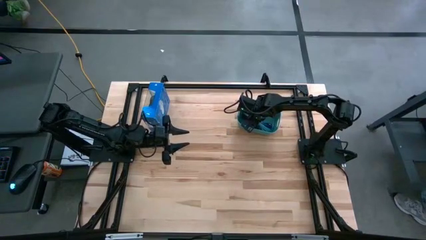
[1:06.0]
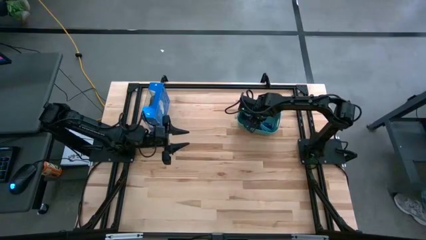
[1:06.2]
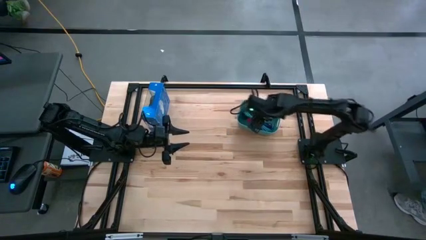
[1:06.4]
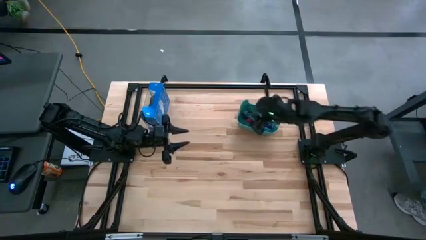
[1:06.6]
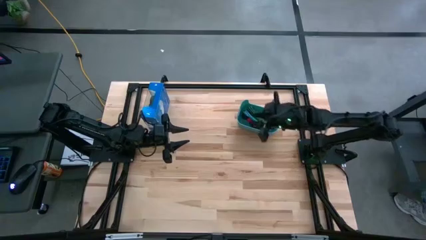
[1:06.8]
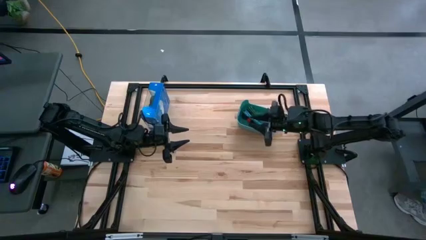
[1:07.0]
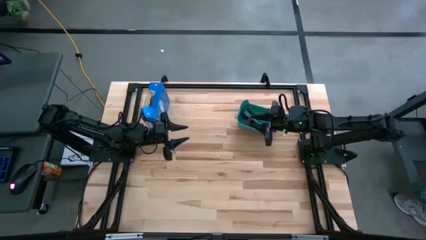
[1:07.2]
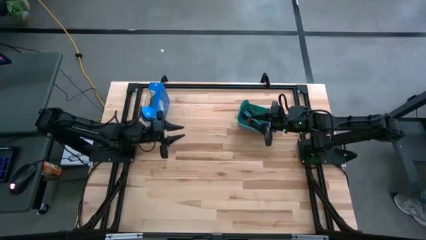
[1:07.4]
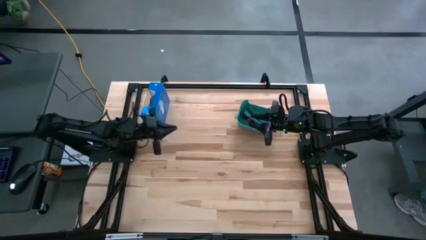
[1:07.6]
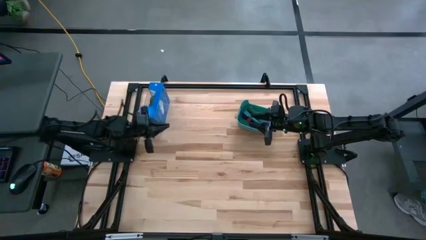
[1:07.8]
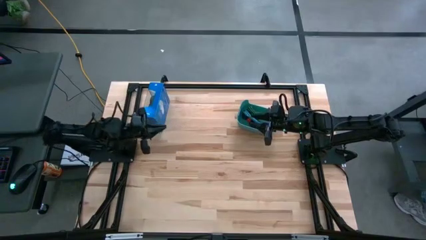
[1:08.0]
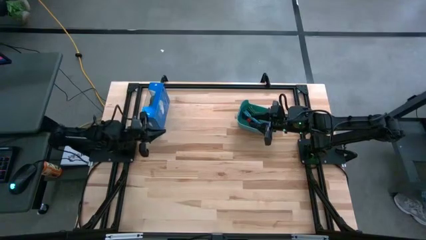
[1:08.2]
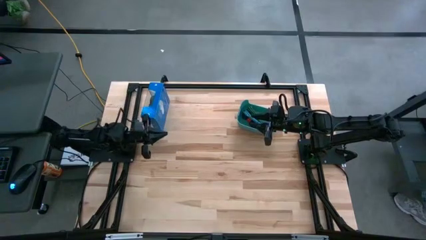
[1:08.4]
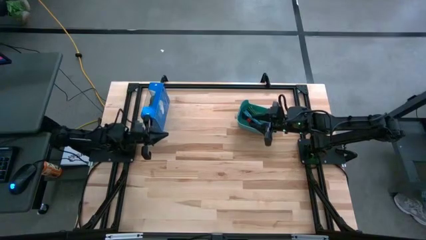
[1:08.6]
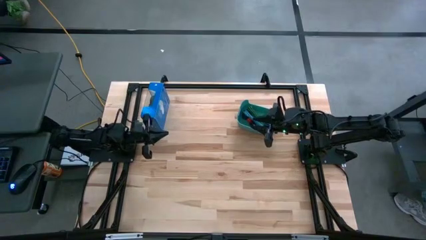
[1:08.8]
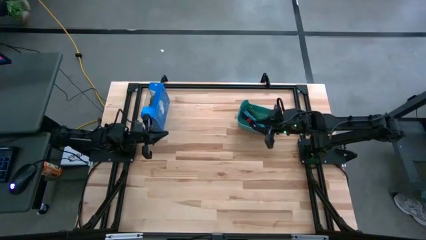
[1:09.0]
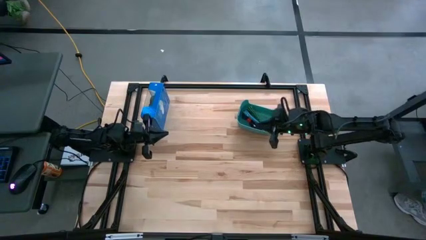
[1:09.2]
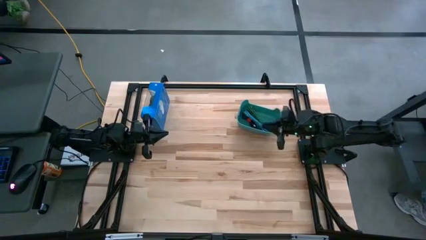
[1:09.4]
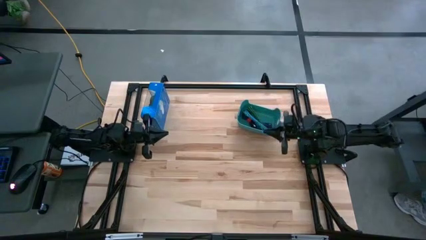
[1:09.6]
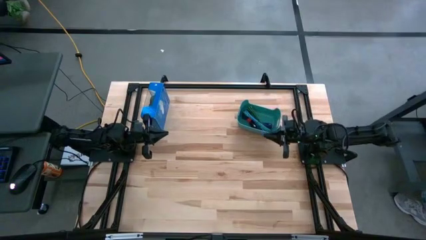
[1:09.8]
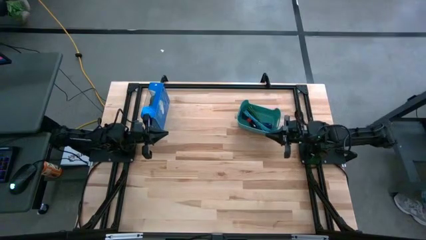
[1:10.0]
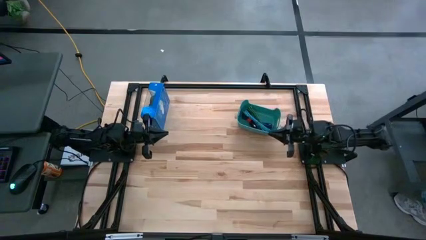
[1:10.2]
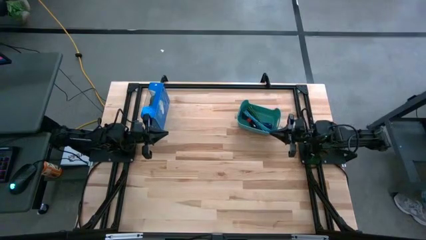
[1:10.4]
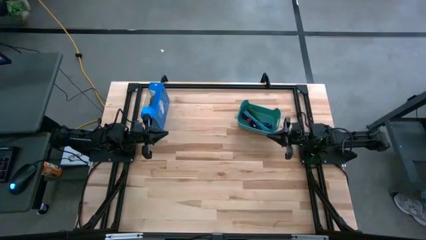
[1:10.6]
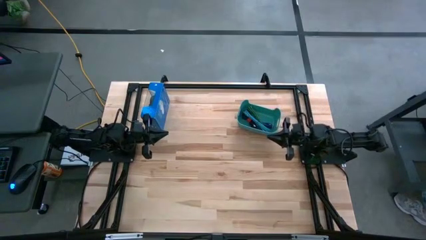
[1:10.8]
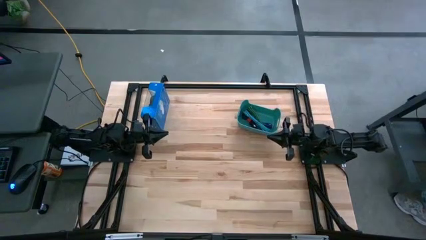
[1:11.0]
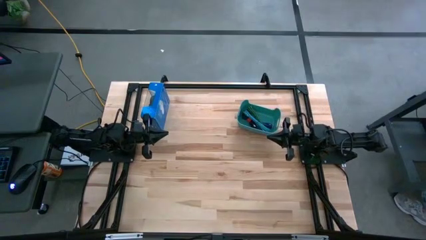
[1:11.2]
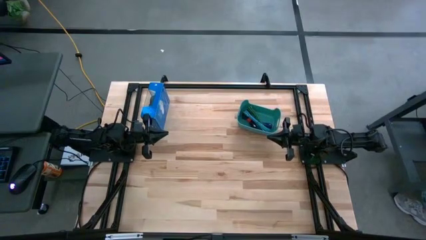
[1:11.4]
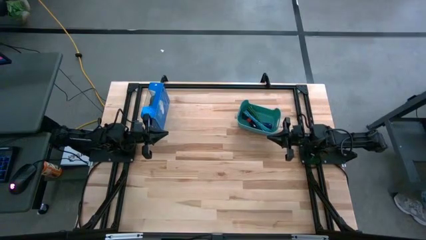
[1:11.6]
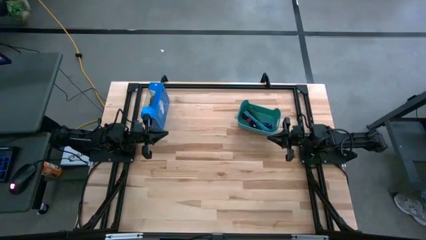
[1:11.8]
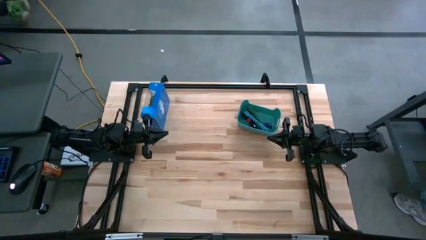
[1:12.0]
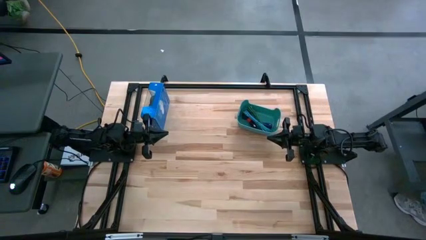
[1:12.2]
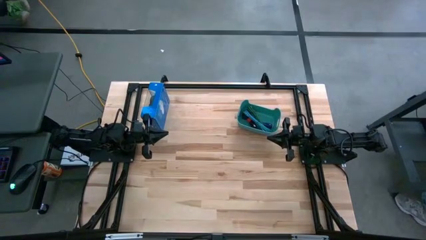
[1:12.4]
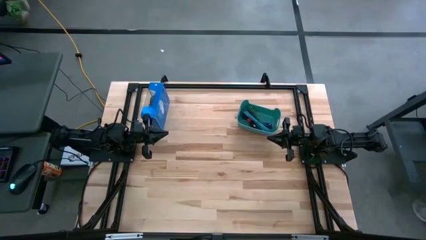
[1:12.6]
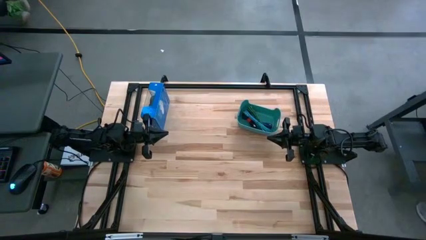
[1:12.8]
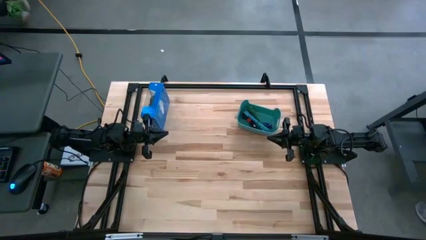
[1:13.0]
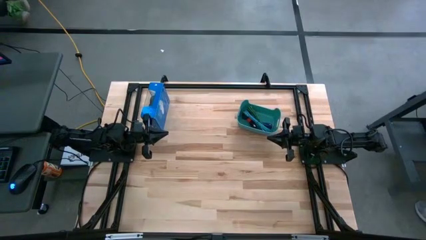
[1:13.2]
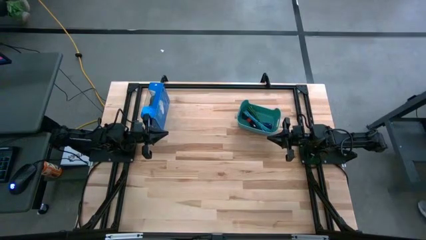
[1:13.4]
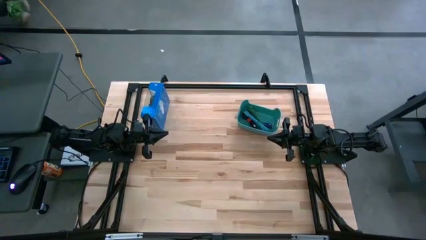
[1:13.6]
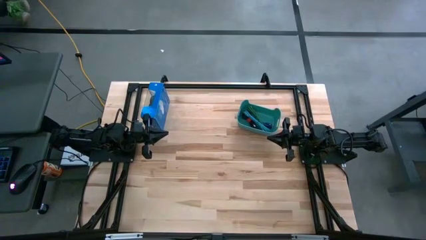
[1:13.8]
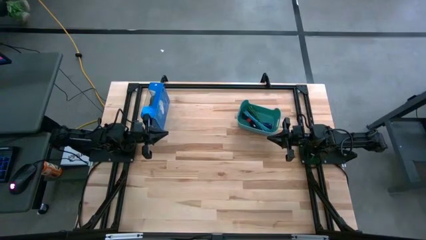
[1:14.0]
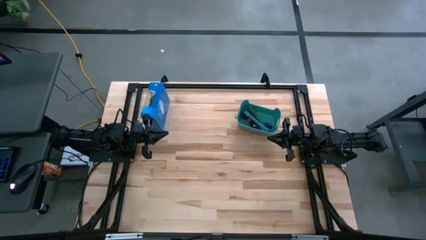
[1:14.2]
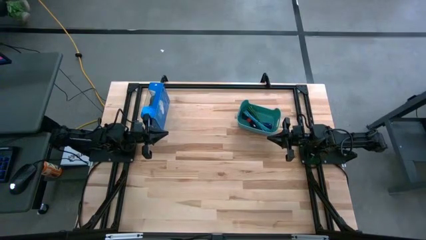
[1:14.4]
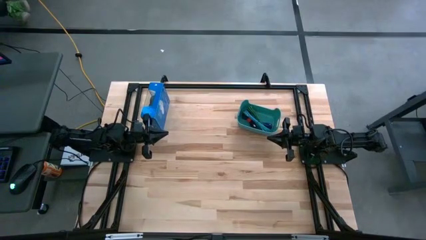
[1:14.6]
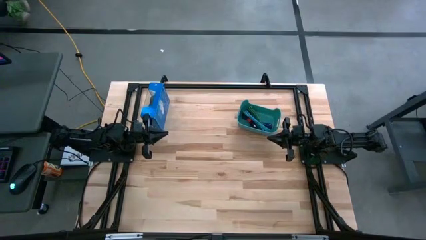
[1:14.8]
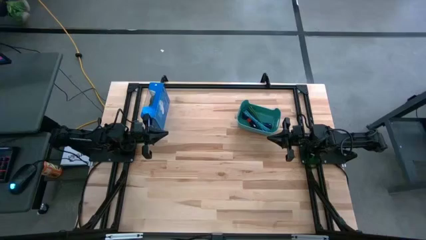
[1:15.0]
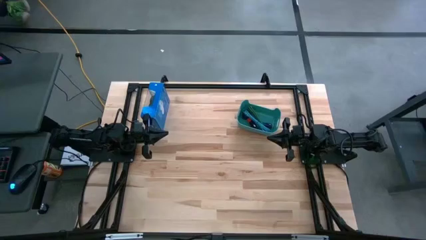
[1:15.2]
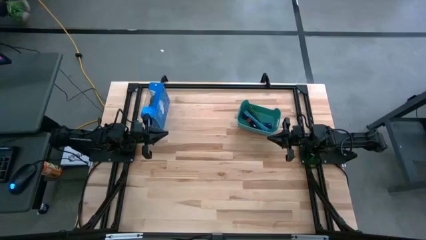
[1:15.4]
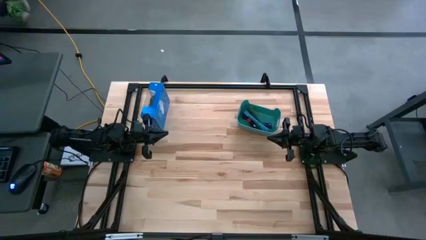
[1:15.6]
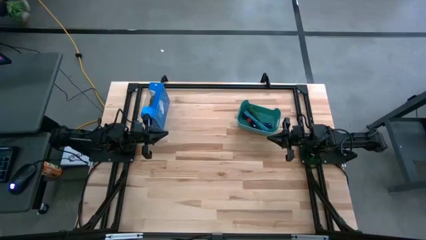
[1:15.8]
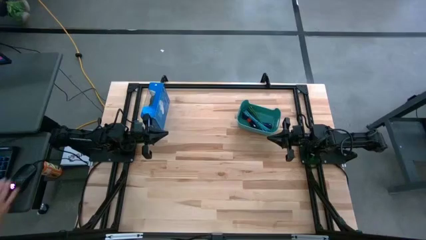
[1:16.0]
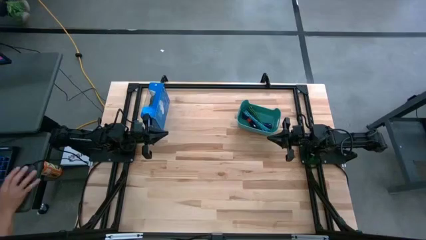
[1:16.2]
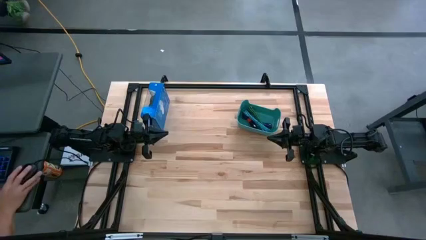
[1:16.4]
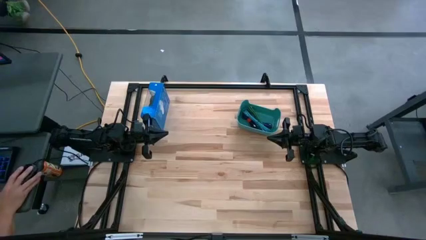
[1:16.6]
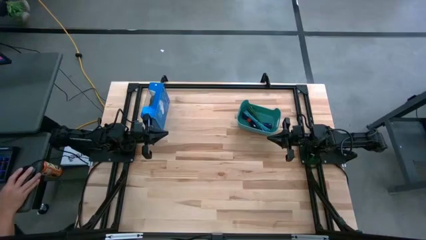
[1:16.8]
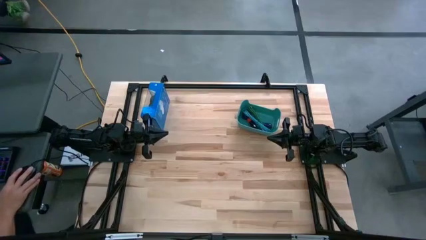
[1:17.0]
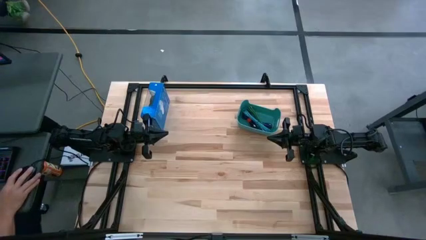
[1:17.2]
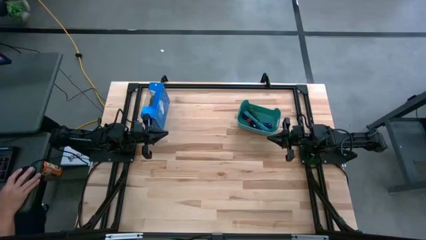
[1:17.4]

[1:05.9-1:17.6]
Task: Pick and place USB-C Cables
Return to Home Position

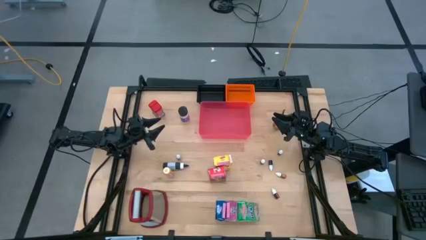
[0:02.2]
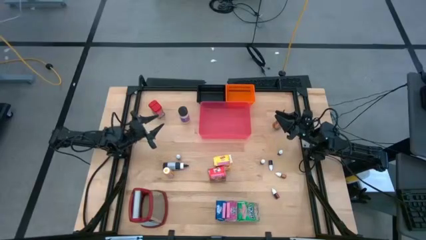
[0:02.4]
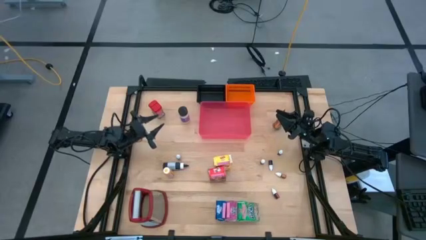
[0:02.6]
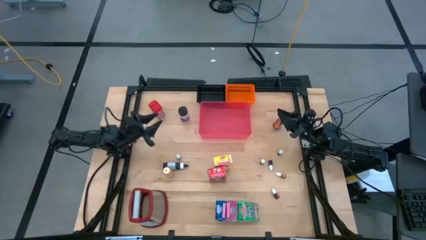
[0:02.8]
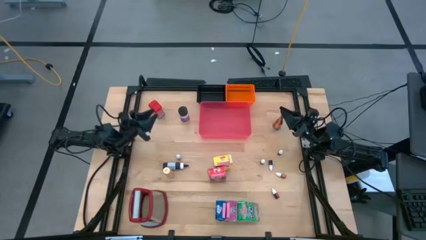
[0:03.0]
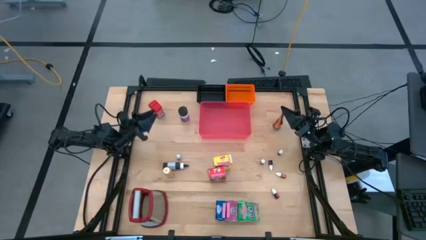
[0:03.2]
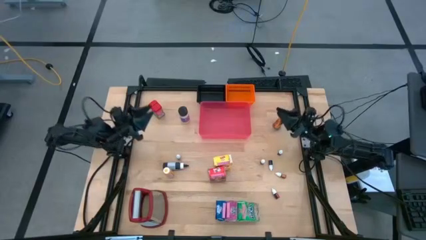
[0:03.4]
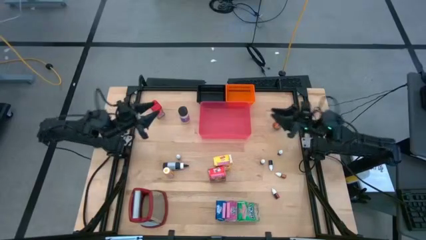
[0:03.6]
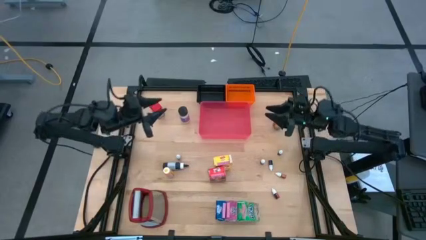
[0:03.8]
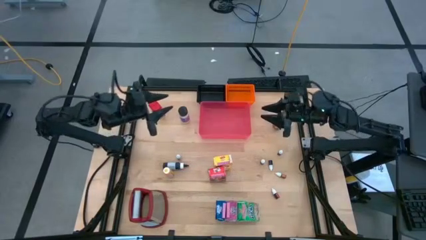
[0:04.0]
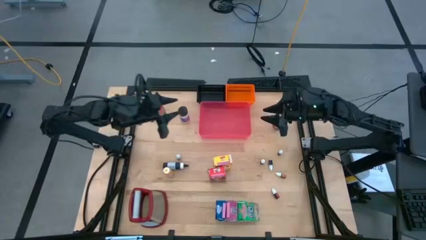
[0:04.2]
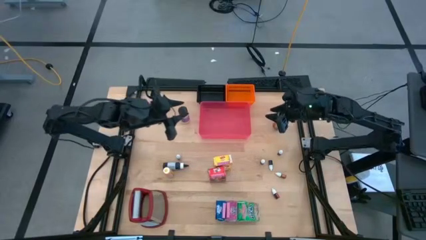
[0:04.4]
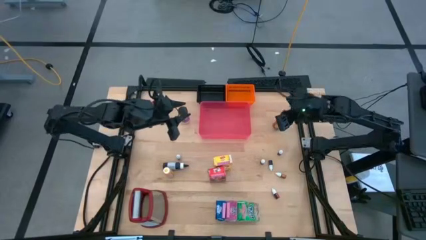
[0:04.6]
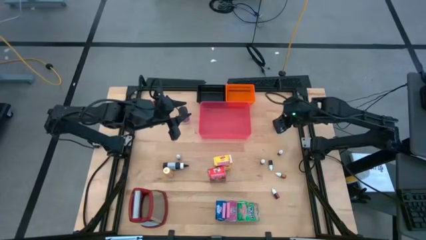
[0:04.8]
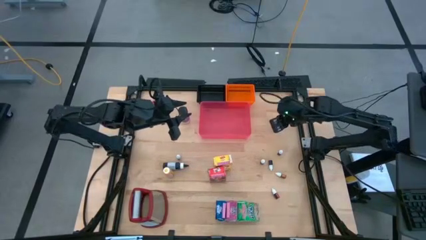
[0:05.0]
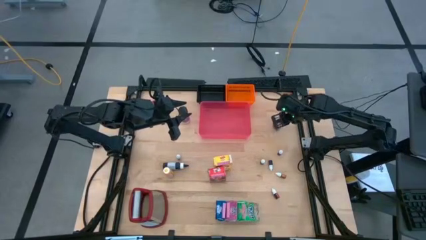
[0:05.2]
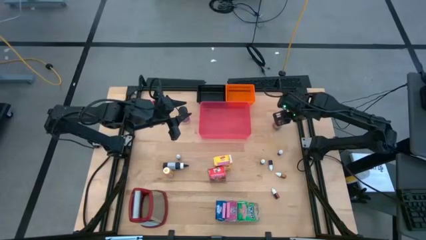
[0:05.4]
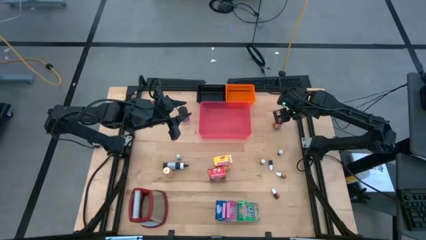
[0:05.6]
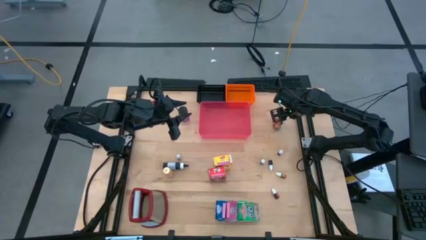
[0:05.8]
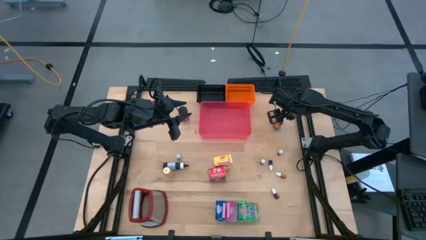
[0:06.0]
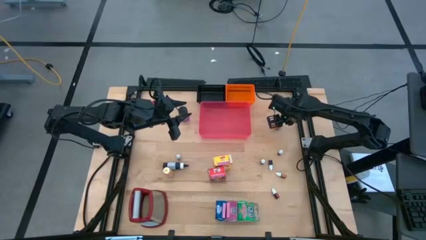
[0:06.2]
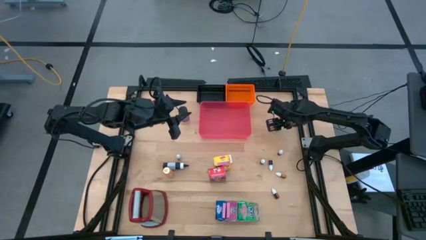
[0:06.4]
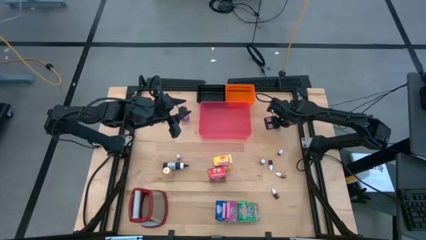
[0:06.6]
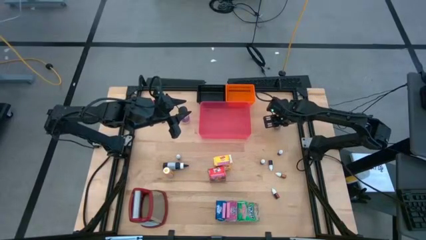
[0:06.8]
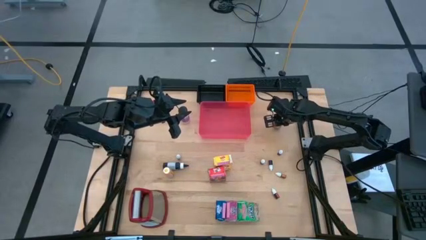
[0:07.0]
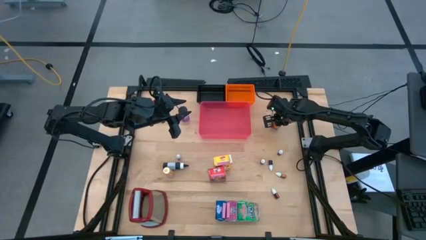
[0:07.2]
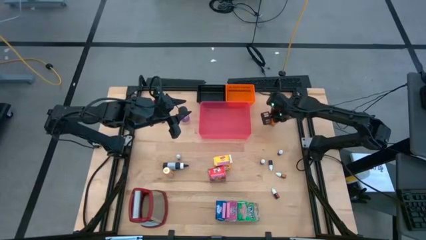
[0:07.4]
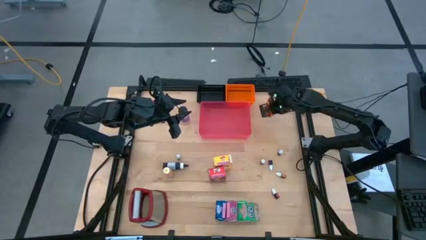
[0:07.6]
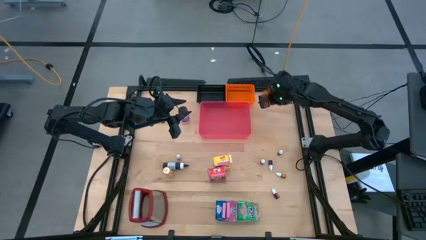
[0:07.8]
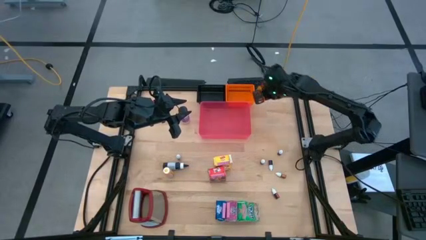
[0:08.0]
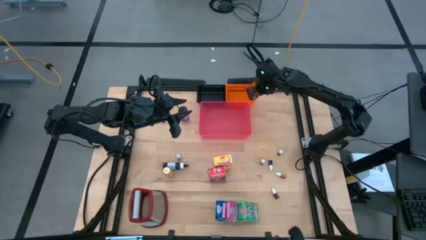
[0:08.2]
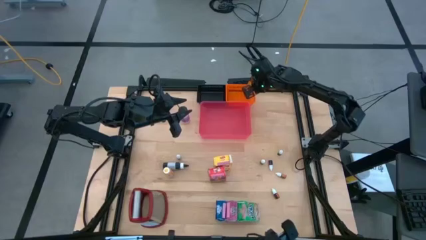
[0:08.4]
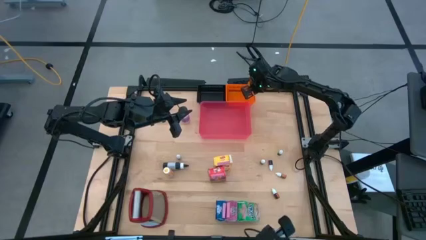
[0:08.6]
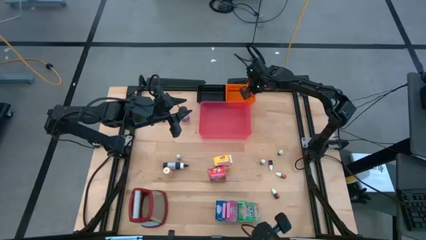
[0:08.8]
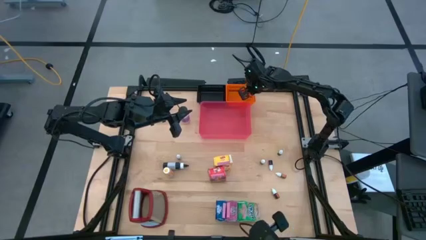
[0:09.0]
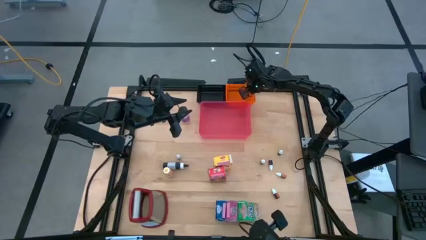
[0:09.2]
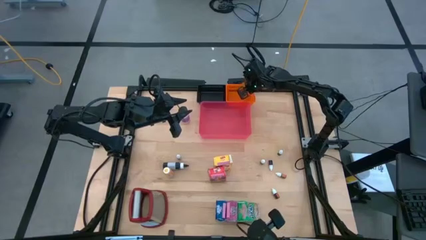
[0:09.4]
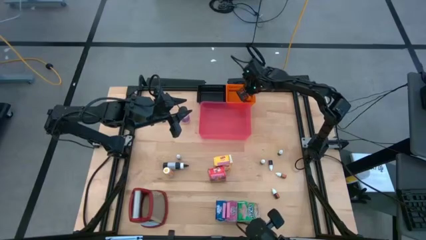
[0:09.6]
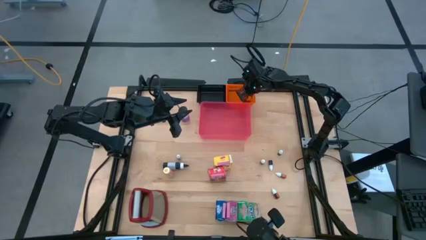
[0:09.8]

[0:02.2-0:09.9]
Task: Pick & Place Kitchen Items
Put the spice bag into the orange bin
